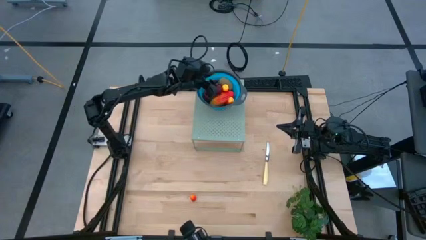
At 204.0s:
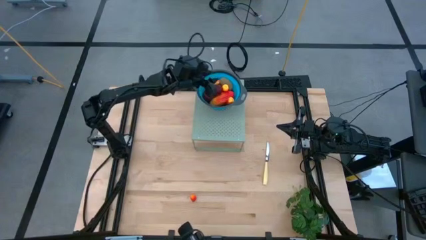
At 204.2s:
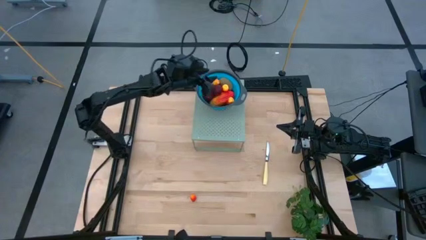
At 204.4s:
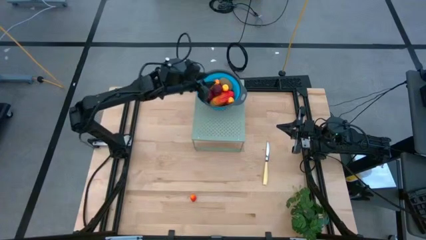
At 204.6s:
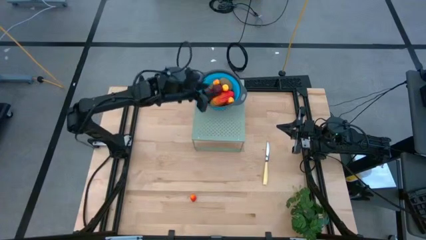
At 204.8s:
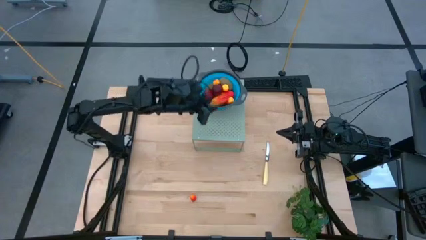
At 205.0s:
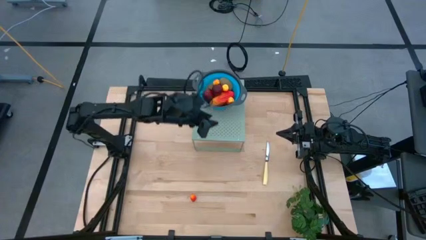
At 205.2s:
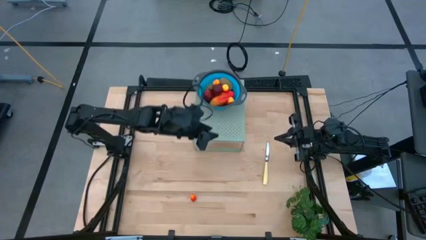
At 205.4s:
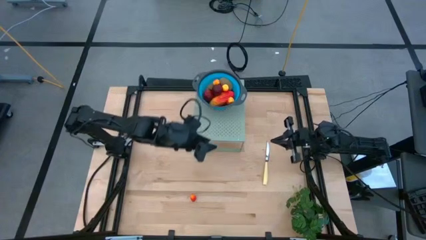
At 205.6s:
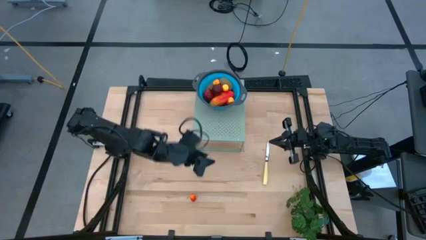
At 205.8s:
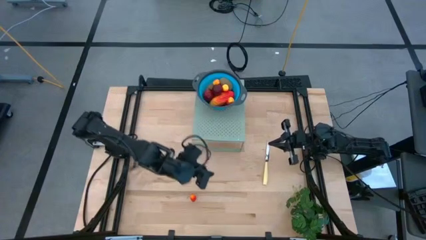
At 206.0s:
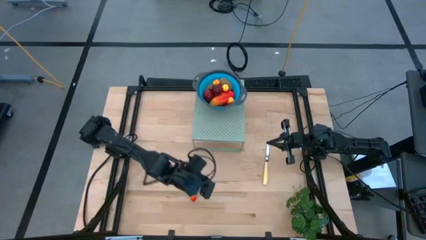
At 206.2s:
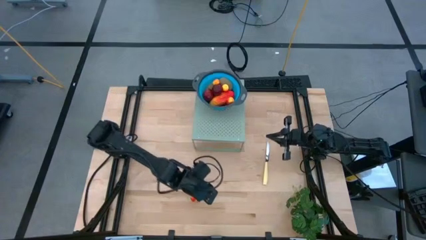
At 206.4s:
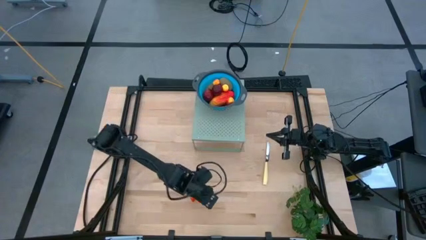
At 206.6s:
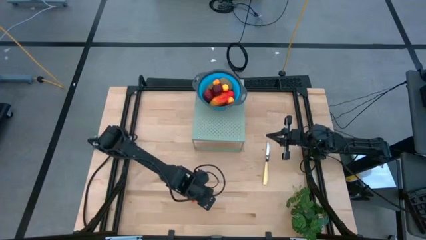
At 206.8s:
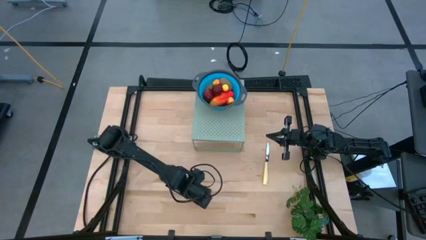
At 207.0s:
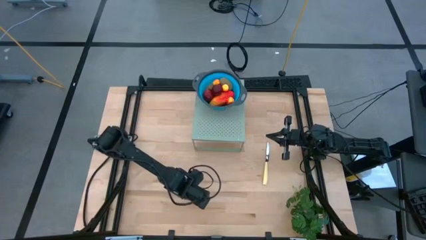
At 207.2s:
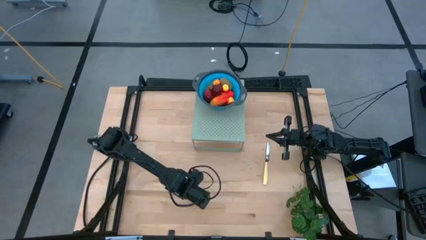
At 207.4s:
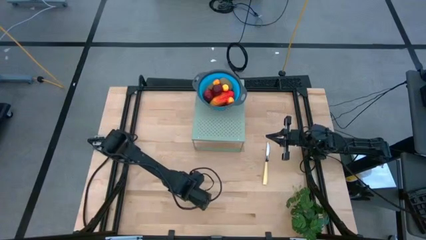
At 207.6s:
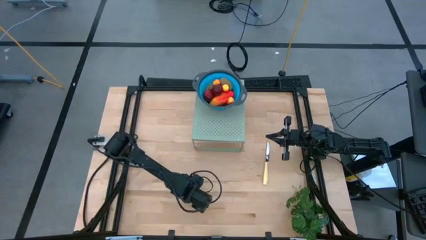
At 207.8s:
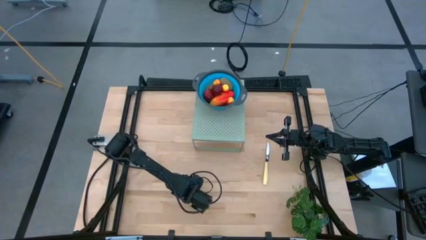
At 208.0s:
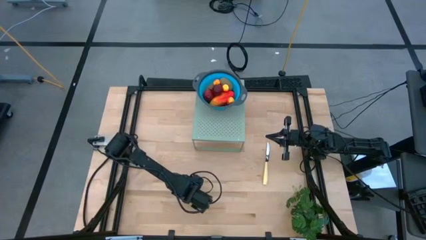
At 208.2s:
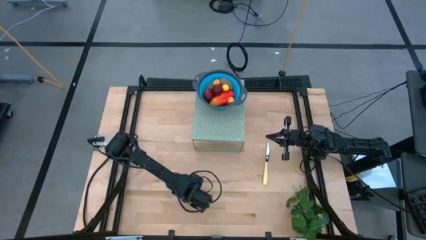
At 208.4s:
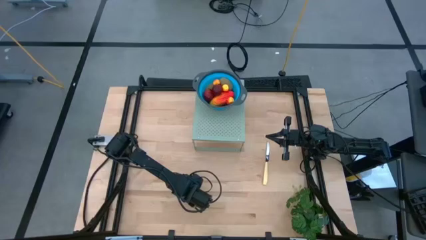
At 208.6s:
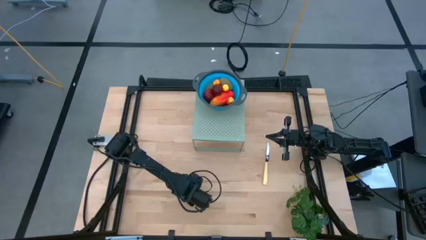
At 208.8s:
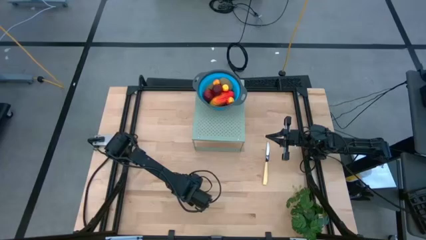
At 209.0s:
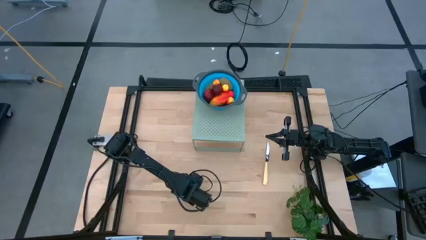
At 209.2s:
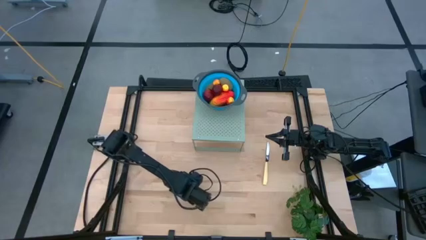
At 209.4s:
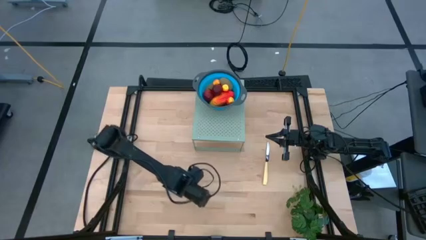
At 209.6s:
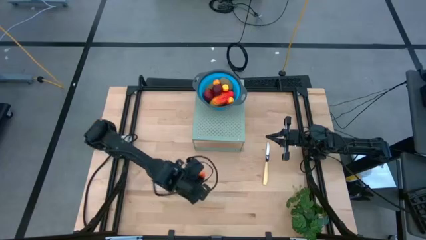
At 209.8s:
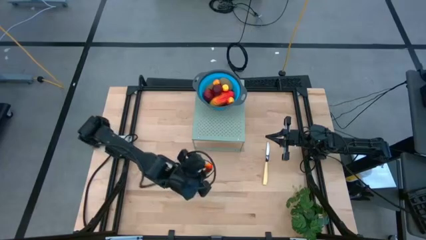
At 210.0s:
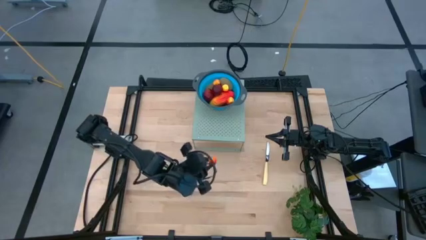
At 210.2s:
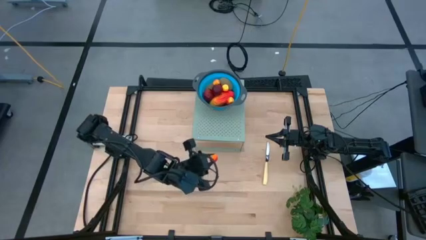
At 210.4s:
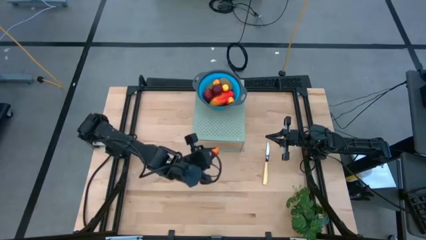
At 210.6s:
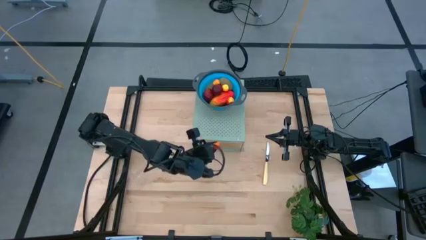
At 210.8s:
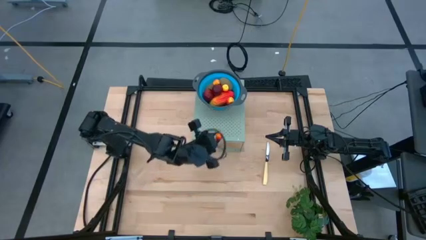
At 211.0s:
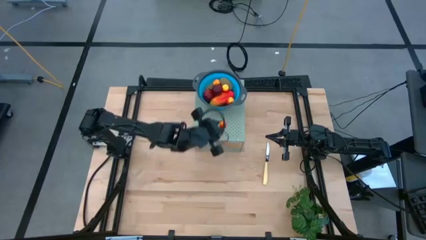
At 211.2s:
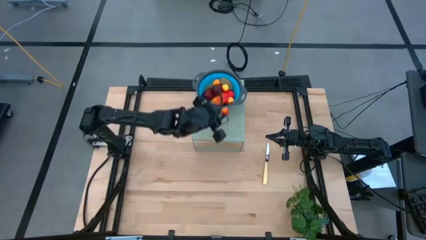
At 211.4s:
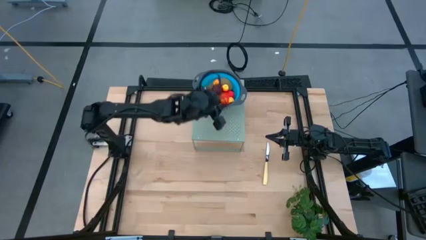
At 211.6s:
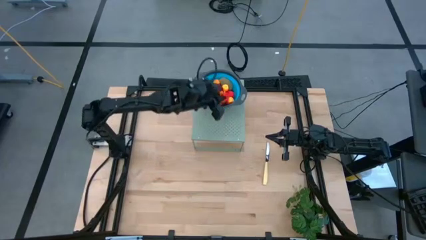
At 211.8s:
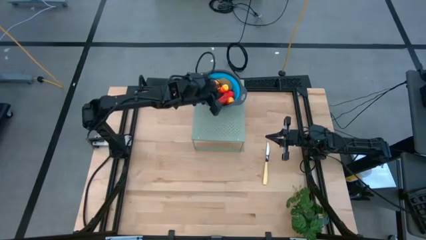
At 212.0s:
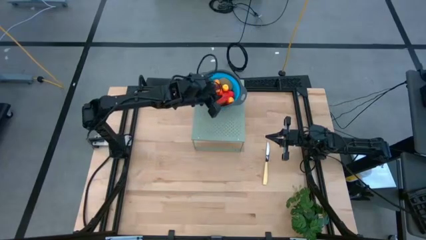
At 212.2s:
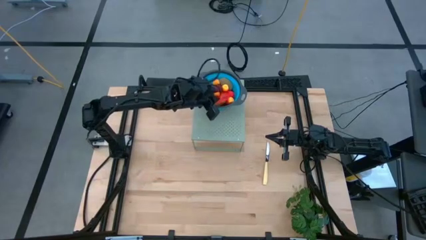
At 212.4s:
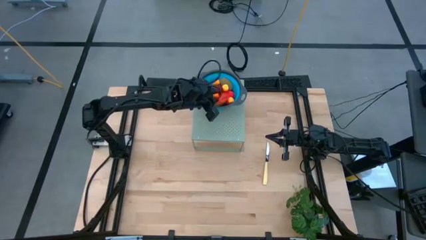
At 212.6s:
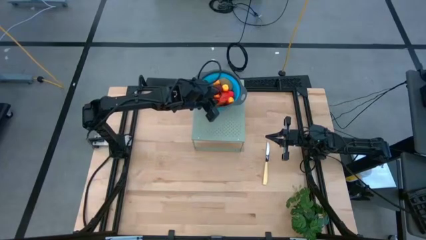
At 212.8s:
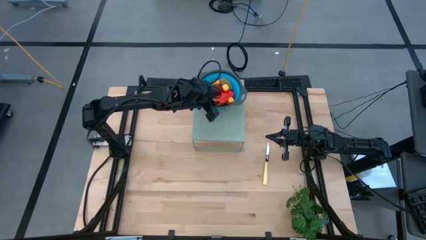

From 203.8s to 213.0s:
Task: Pick & Place Fruit
Put the peach into the blue strainer bowl on the shelf

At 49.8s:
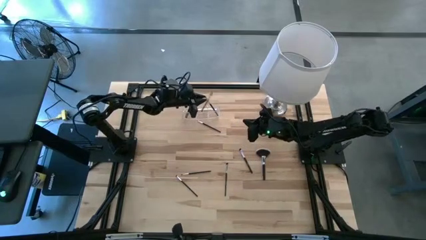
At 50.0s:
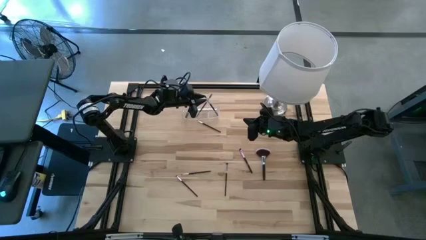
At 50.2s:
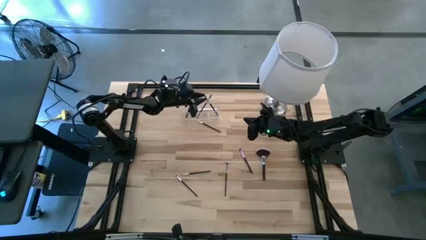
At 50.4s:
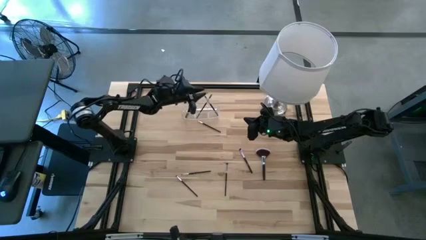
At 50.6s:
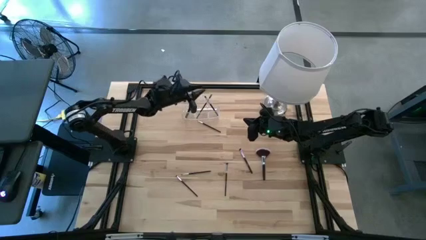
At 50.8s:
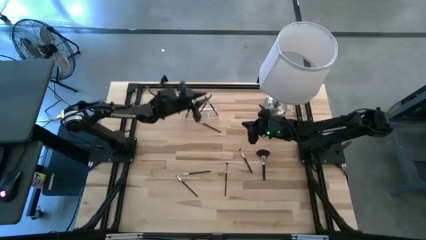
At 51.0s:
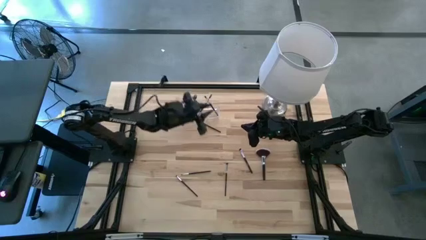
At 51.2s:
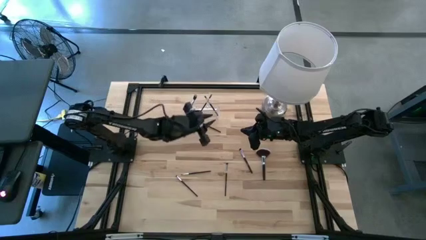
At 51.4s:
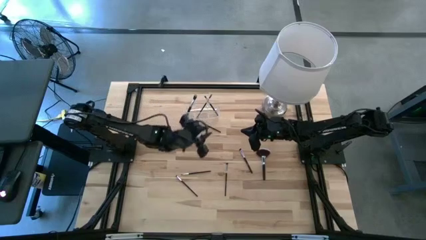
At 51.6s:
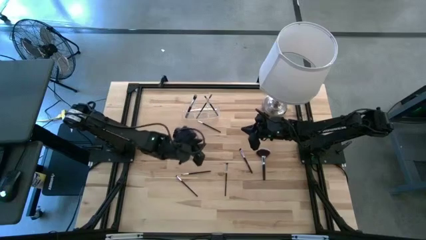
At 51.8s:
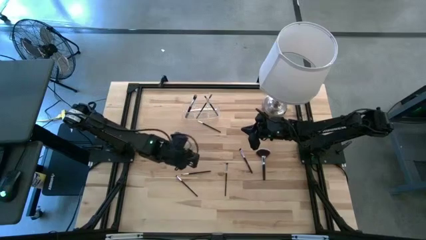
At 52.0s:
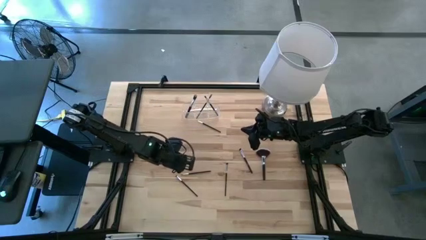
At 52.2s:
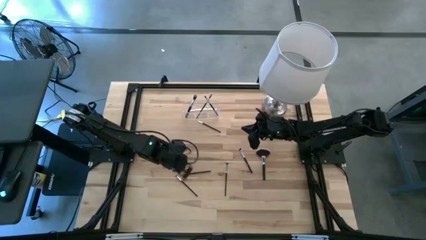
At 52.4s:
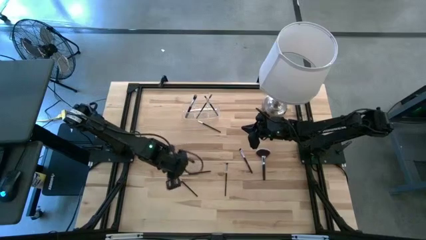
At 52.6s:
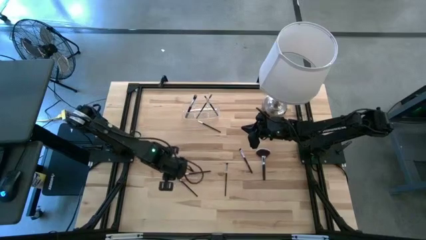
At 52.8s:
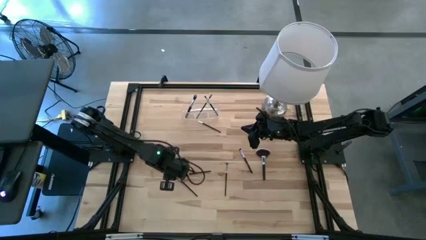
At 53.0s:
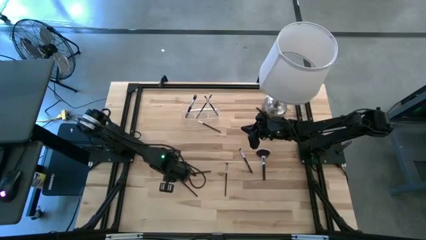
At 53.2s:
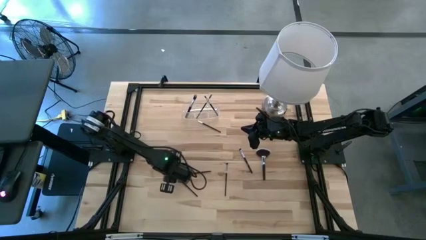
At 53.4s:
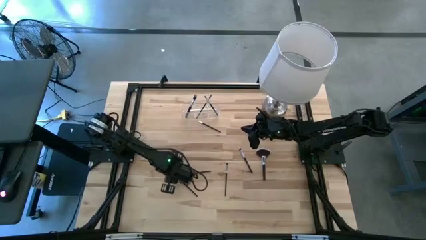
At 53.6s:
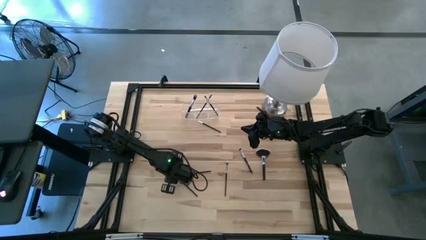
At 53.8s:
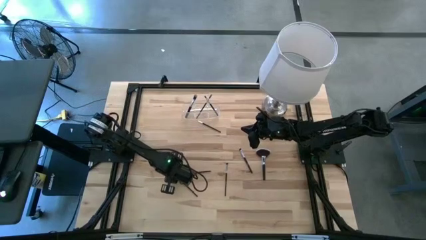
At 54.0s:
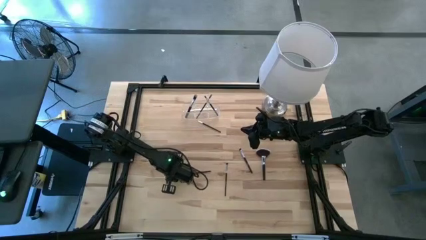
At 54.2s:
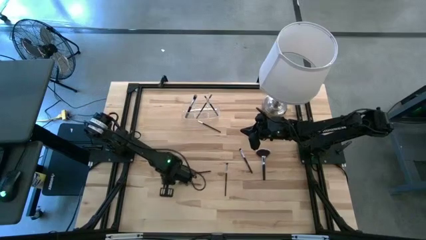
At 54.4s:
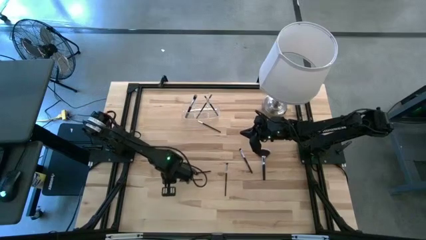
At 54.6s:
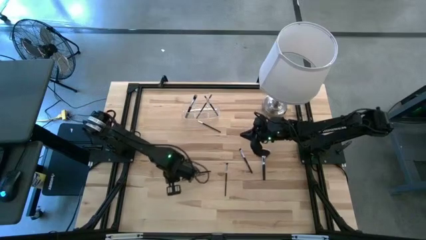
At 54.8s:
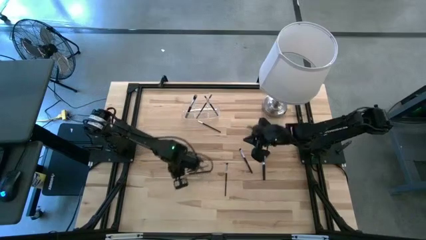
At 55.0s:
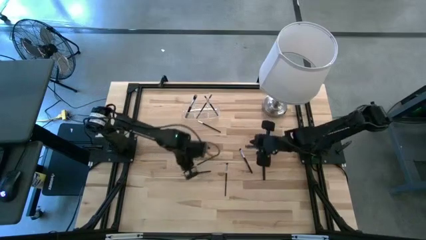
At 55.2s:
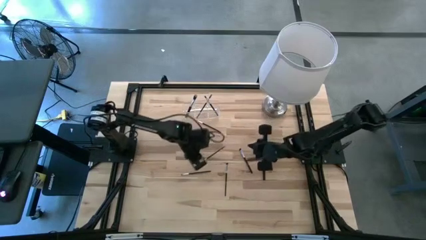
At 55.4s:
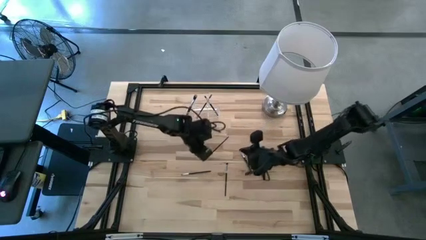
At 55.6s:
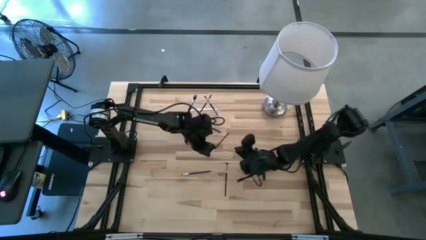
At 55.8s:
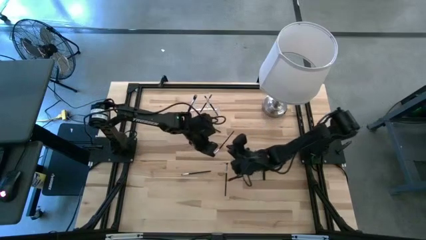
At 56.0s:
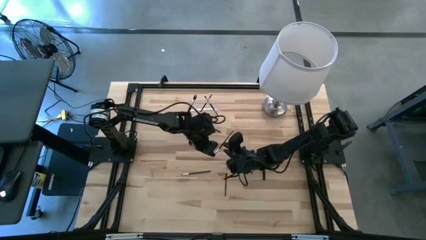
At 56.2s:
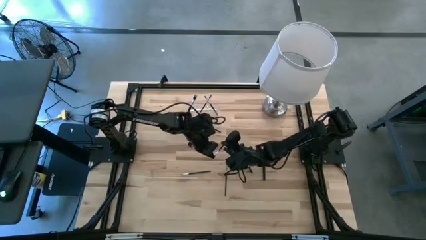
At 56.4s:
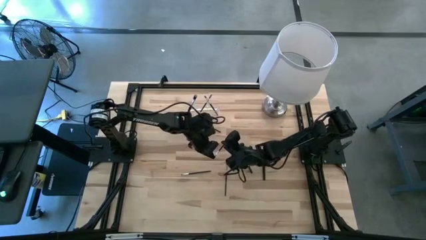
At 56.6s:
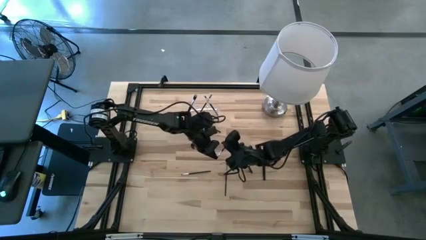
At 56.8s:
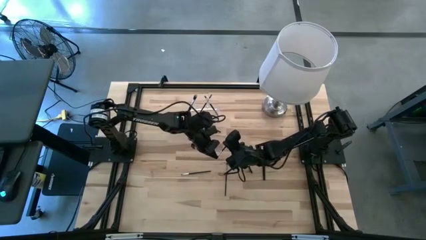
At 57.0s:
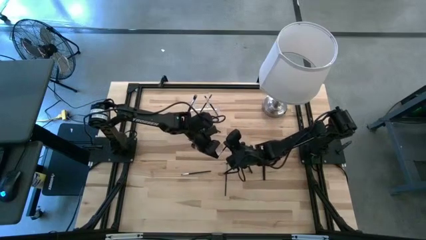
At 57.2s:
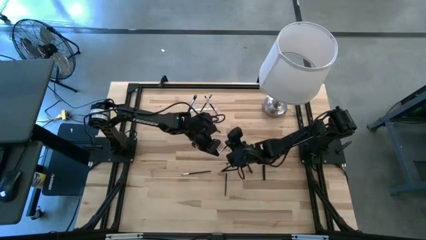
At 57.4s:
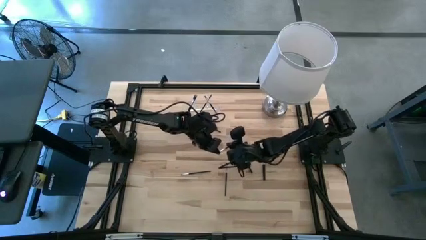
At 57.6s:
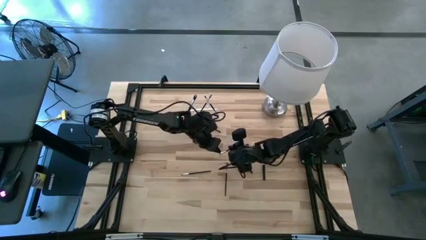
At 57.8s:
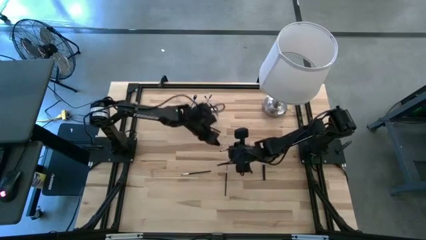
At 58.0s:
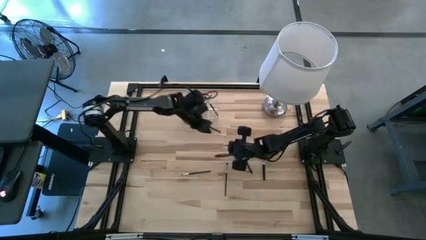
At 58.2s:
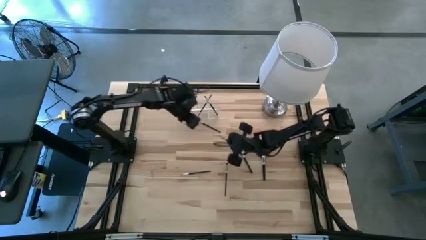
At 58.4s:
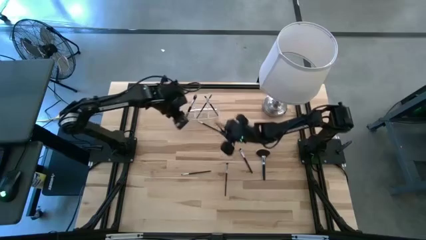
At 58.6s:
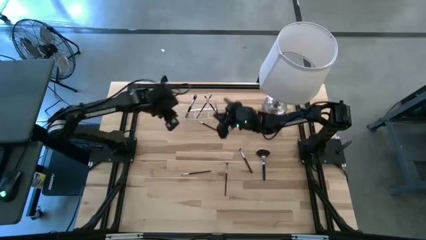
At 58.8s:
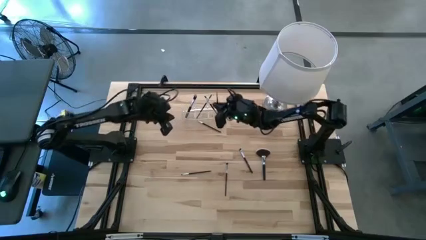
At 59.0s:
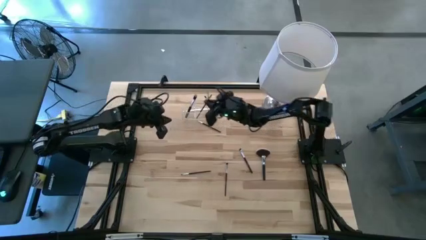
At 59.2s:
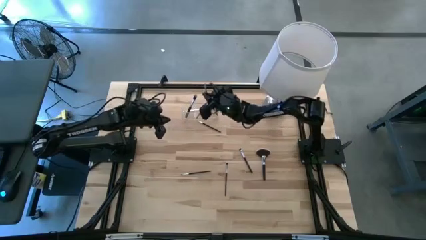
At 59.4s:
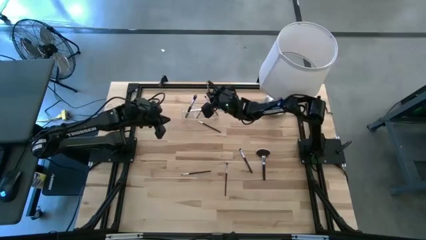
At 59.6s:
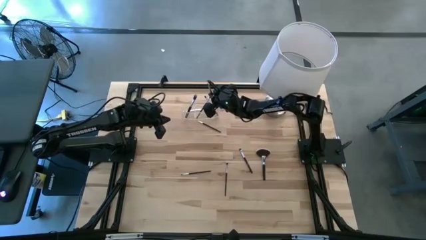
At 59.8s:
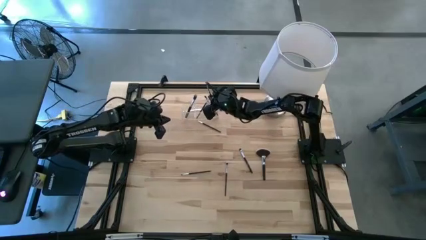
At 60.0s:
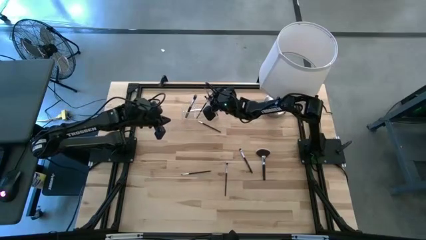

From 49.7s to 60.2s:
Task: Put items in baskets/containers
Put the foundation brush into the transparent organizer
